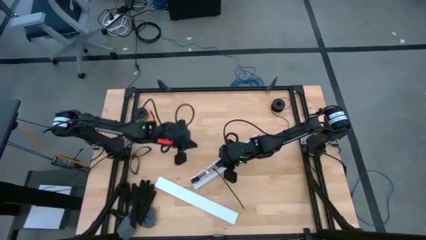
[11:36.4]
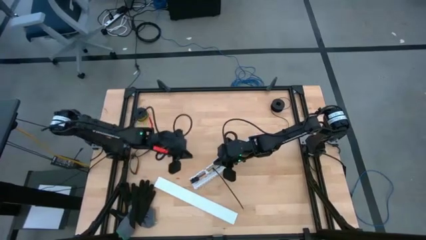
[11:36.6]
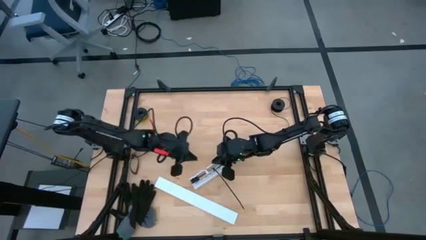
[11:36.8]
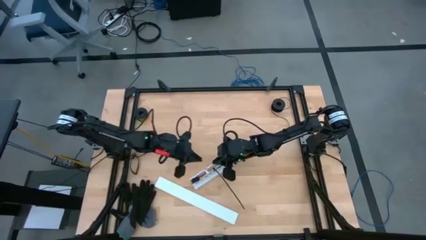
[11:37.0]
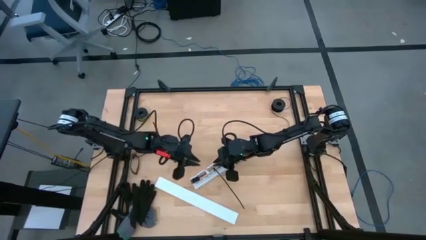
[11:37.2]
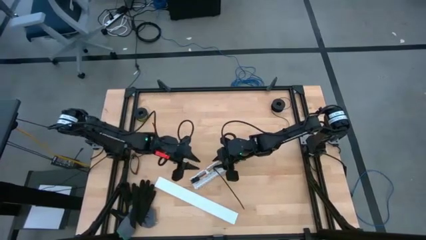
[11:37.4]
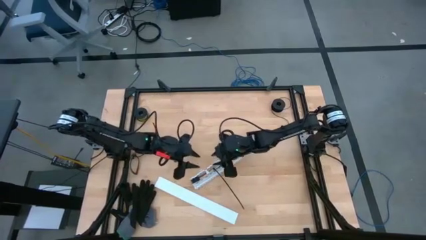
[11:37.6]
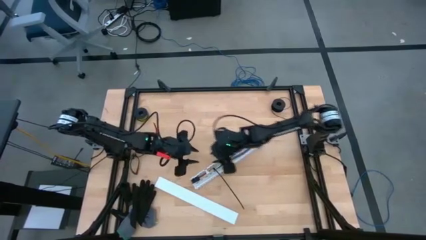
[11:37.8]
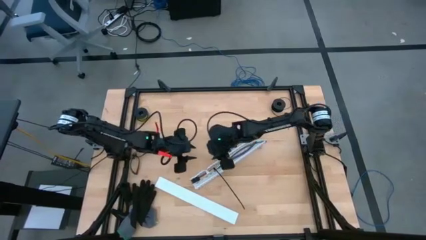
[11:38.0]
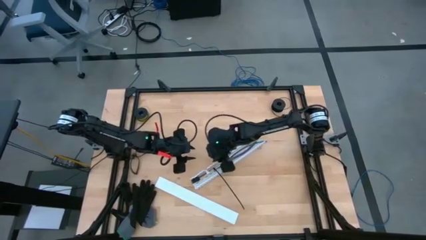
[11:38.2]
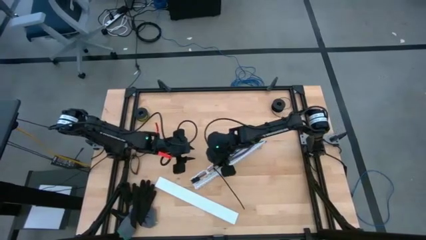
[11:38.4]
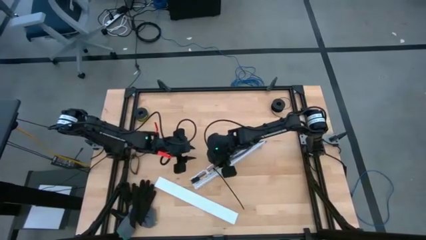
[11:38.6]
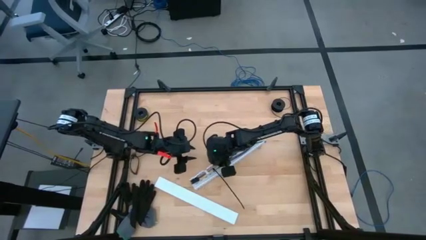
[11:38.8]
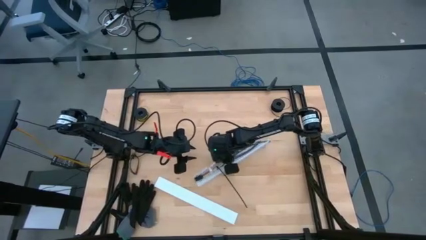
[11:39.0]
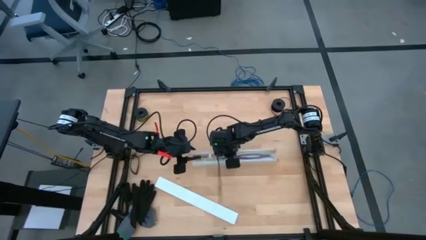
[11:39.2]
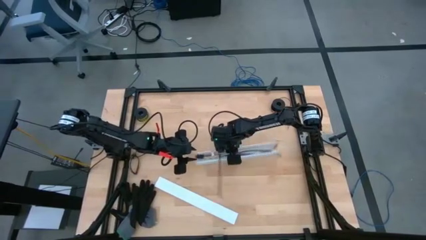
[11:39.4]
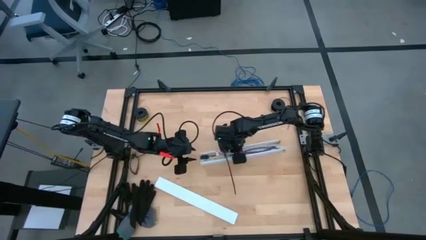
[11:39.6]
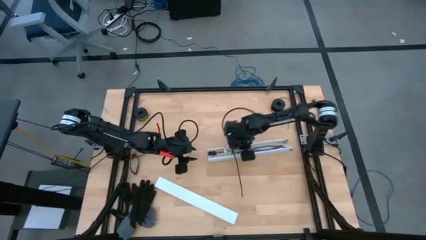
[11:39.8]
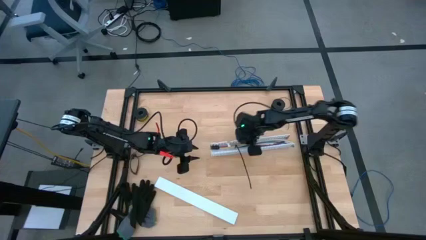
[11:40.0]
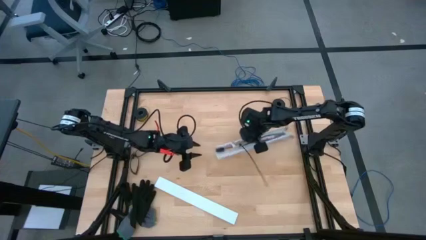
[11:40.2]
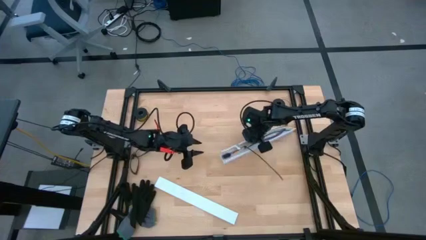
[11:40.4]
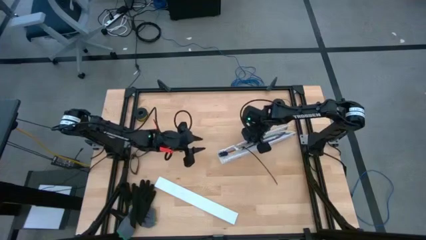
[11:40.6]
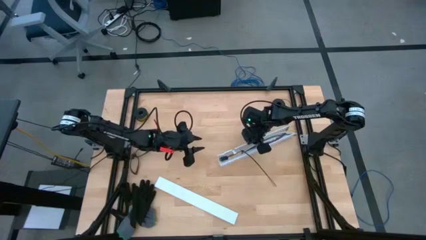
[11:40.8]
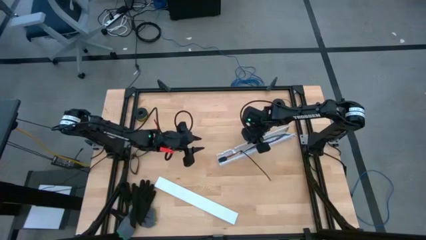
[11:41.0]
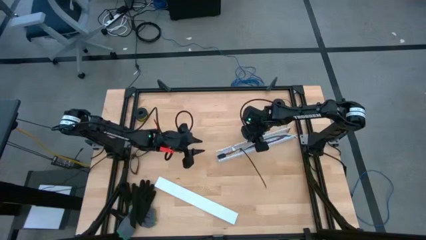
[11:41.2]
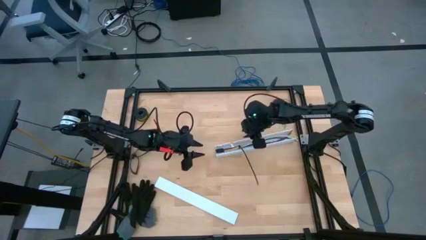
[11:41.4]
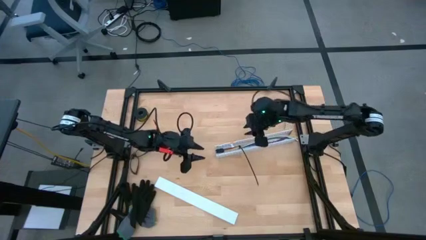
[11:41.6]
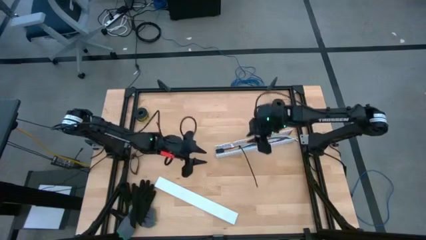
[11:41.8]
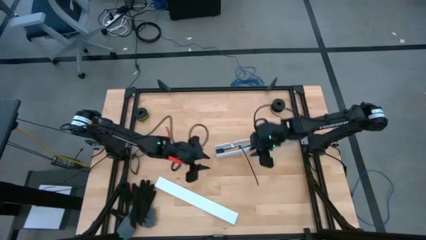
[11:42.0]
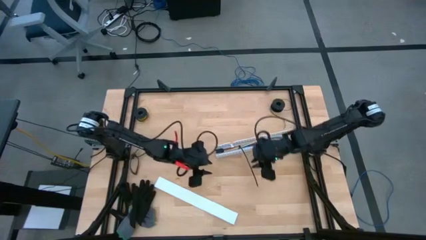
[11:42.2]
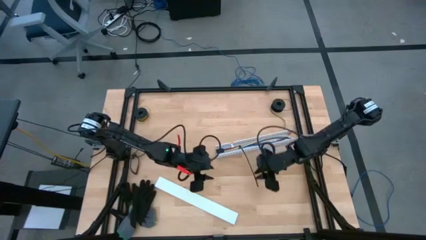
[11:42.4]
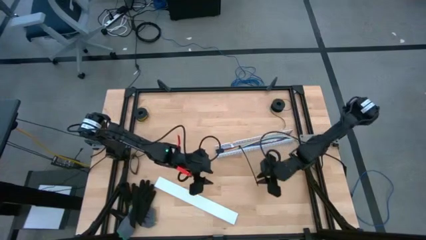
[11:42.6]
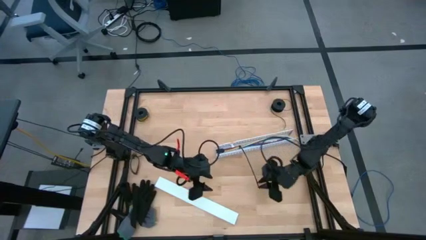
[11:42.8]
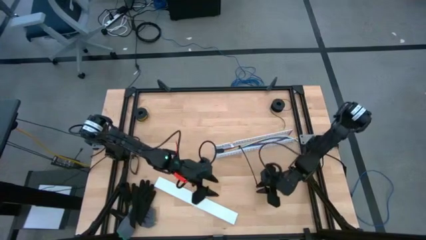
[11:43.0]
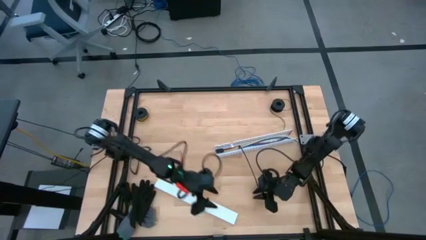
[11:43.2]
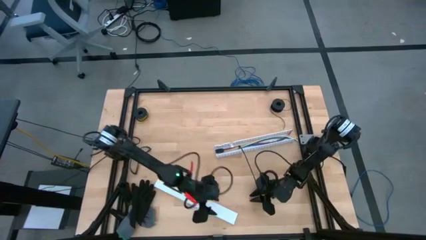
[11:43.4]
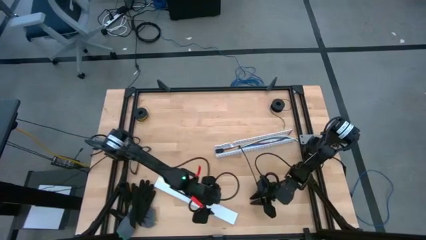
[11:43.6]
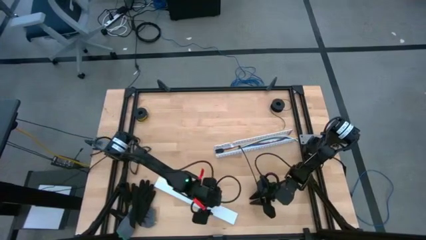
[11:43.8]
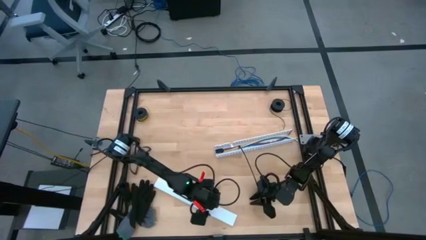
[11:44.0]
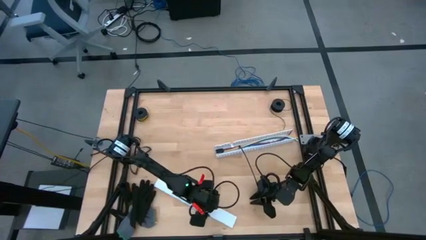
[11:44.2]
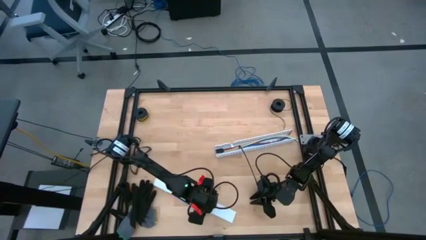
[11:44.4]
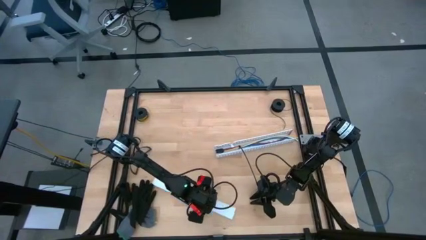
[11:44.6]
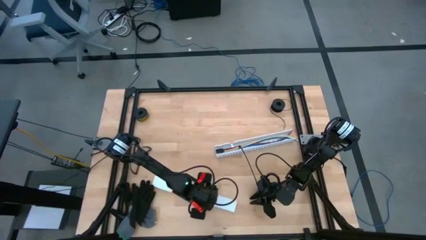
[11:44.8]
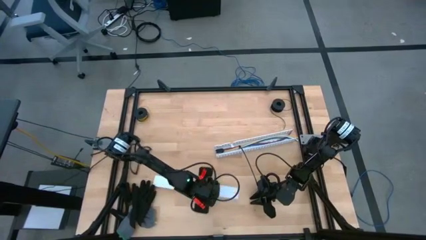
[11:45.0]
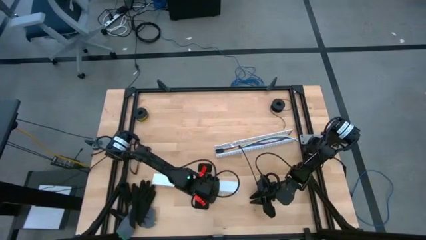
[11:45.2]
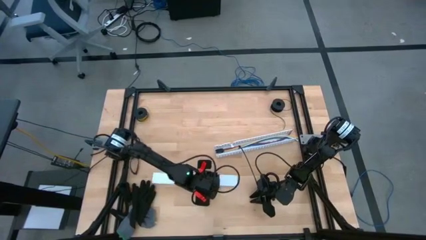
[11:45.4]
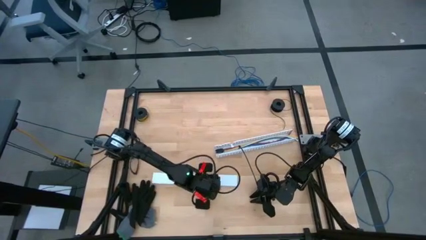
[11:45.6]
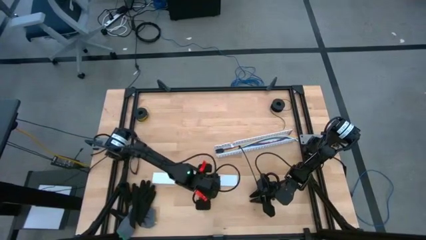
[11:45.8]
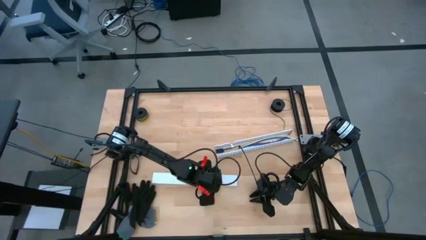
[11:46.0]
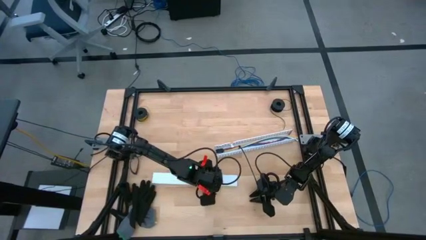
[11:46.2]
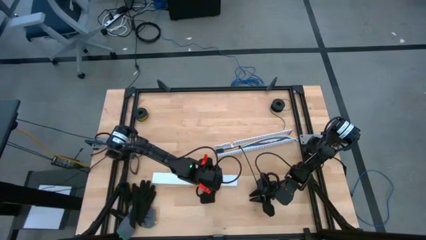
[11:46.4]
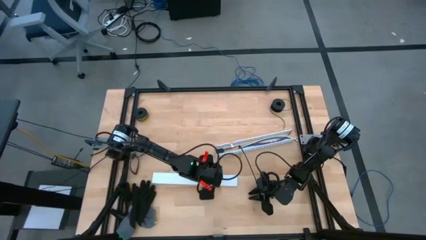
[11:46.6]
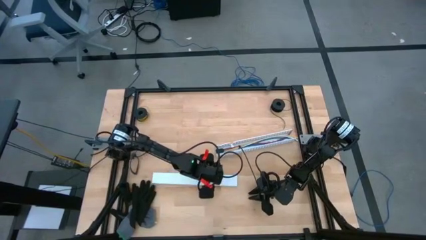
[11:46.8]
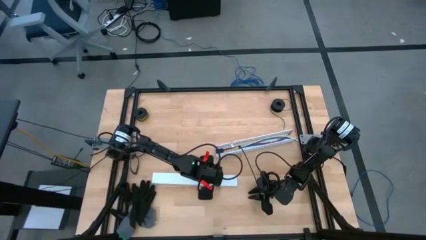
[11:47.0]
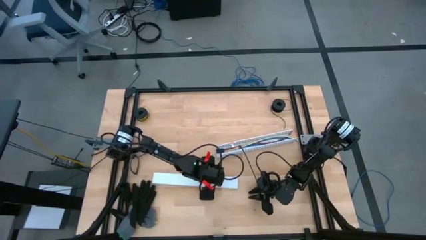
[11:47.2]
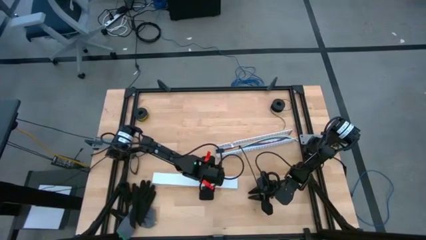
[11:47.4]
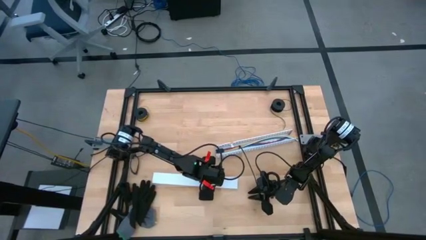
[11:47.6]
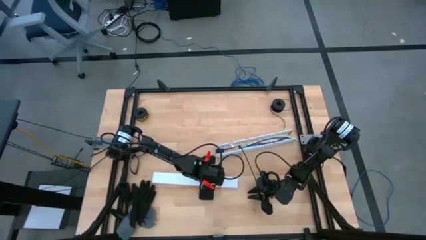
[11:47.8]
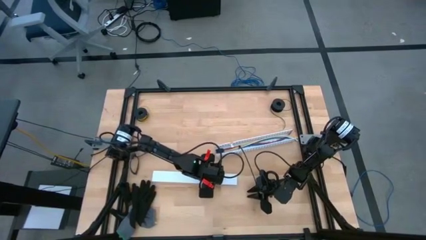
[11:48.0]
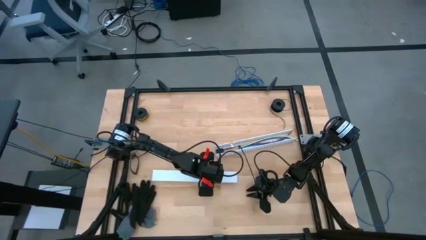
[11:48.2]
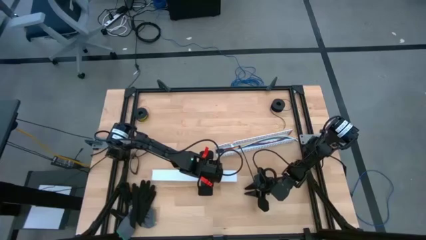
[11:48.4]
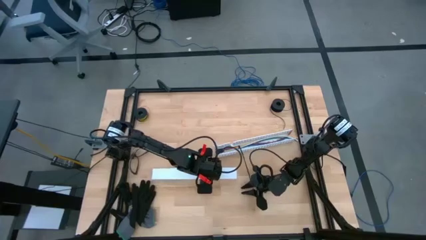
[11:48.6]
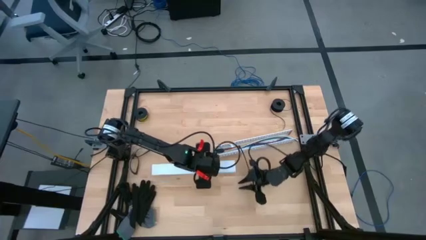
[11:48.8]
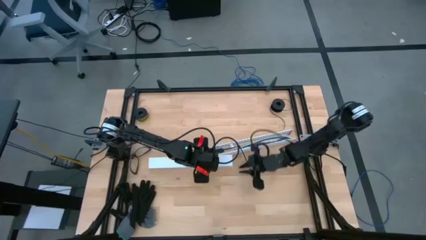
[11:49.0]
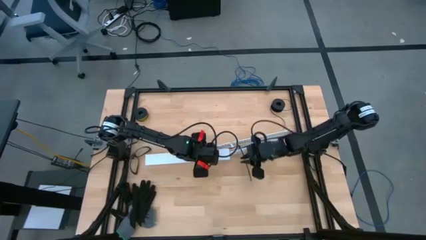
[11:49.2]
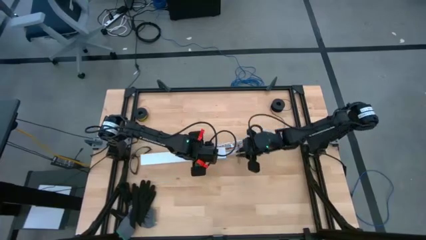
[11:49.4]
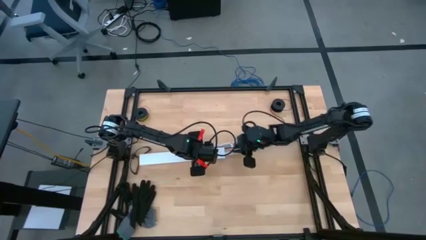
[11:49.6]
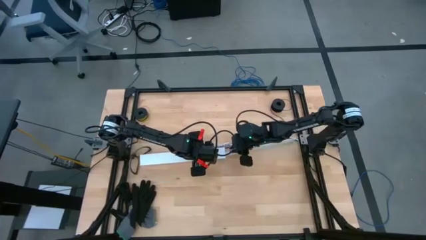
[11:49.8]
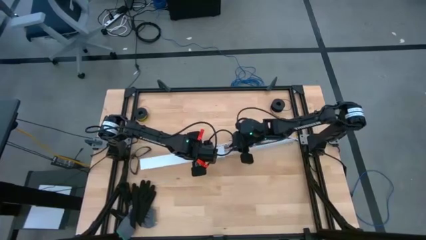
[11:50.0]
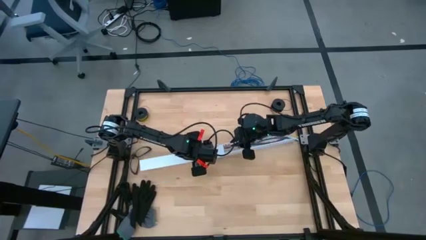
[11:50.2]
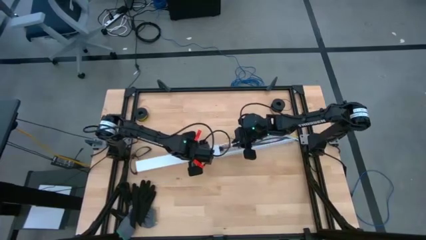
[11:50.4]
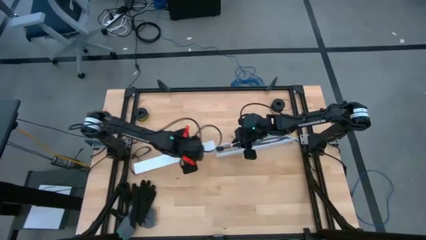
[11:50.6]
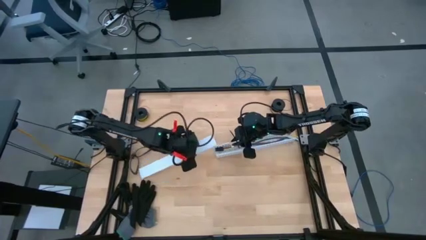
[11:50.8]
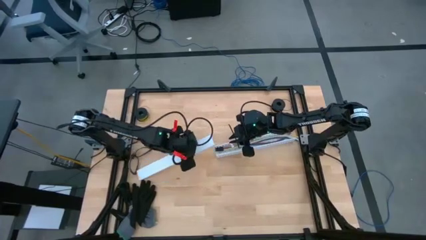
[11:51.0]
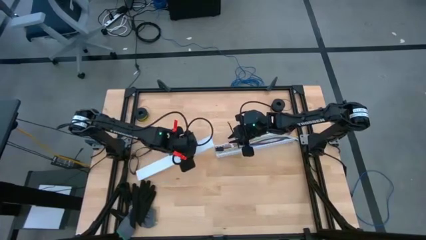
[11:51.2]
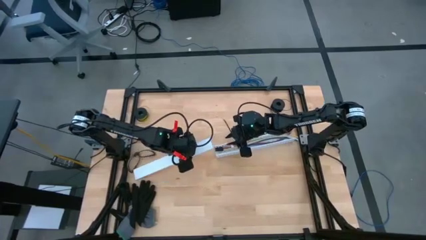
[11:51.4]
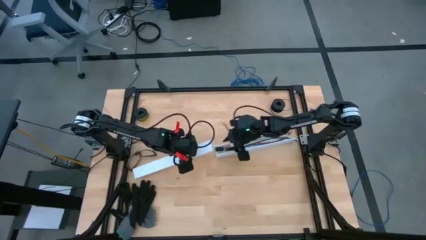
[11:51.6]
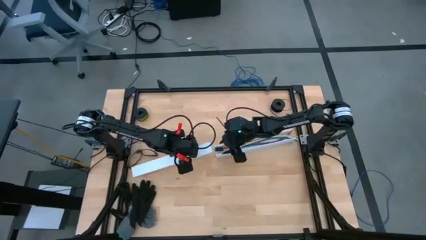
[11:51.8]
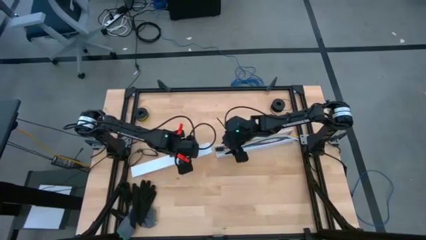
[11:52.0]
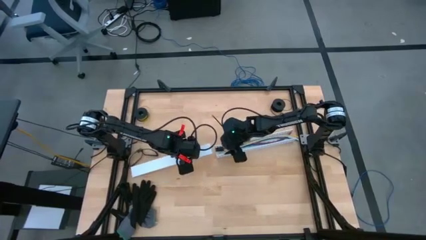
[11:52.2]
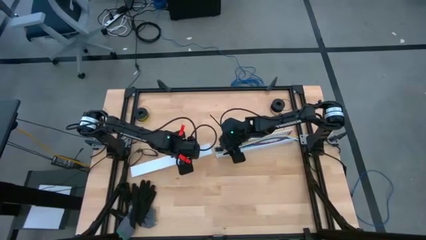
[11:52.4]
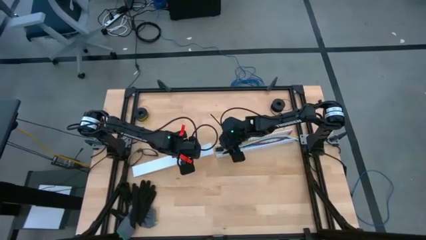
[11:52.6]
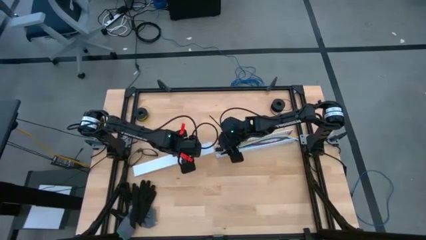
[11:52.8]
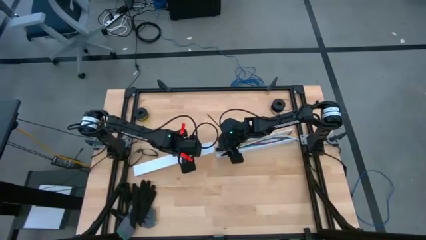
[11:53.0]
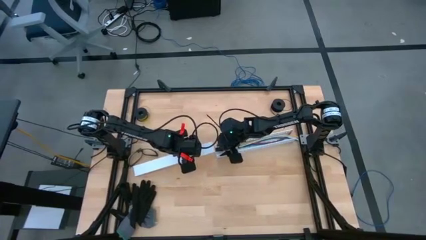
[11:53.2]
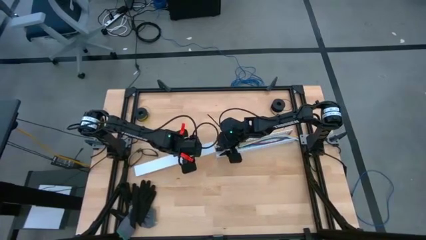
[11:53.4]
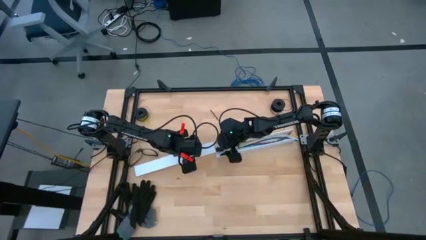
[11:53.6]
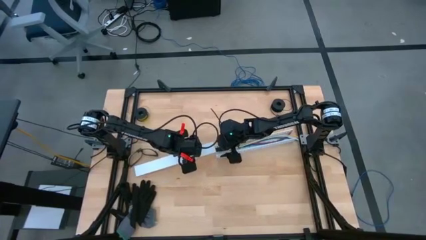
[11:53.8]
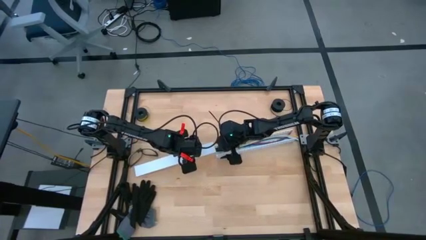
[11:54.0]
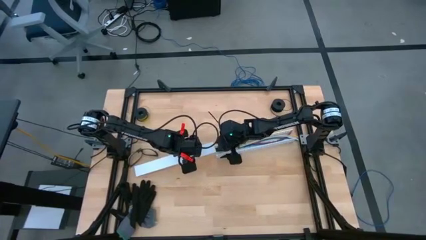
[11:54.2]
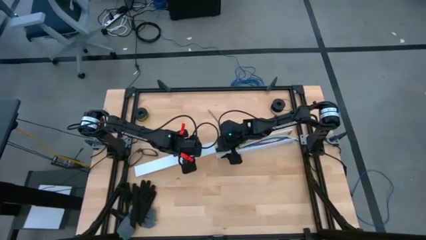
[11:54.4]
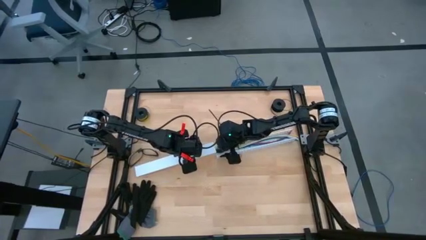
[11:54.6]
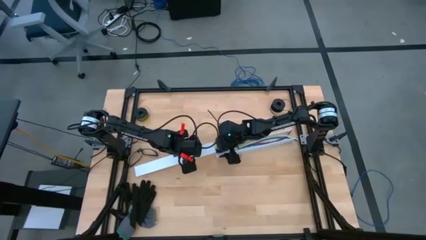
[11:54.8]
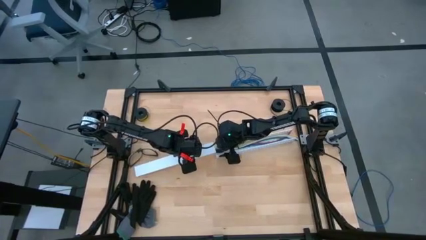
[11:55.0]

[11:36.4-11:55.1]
Task: Ziptie cables
Close the white cable duct
